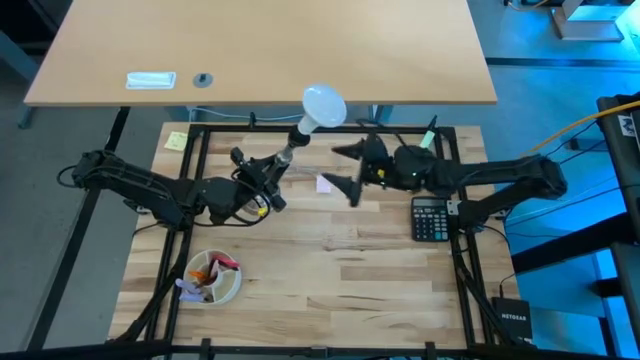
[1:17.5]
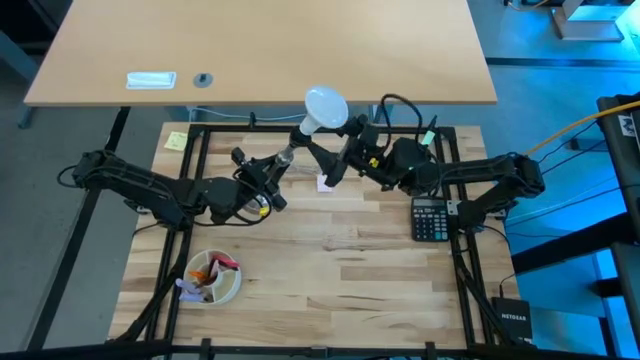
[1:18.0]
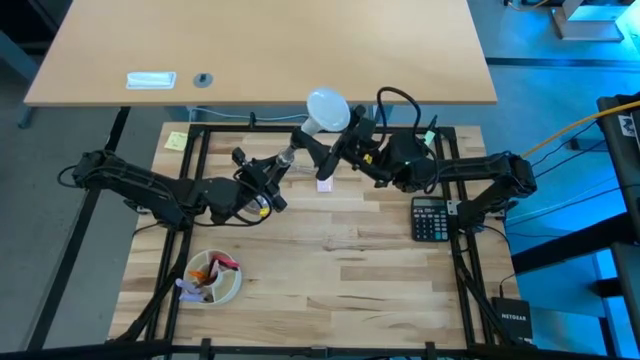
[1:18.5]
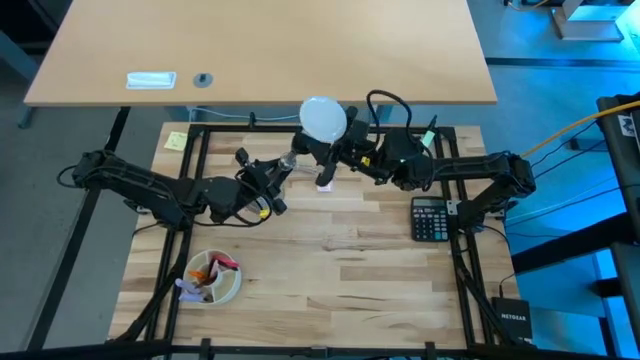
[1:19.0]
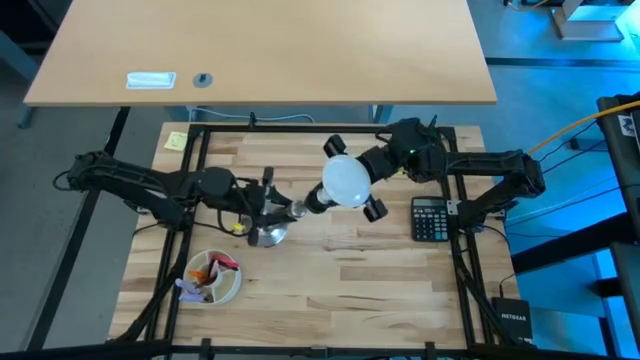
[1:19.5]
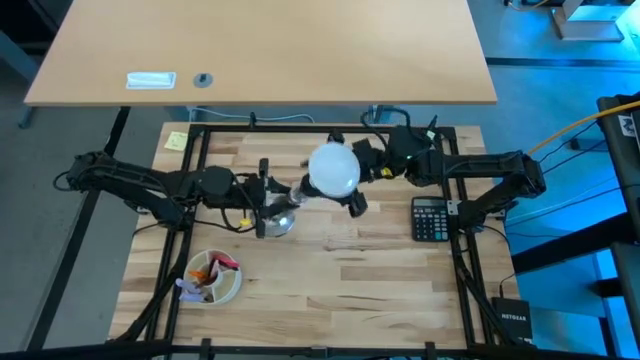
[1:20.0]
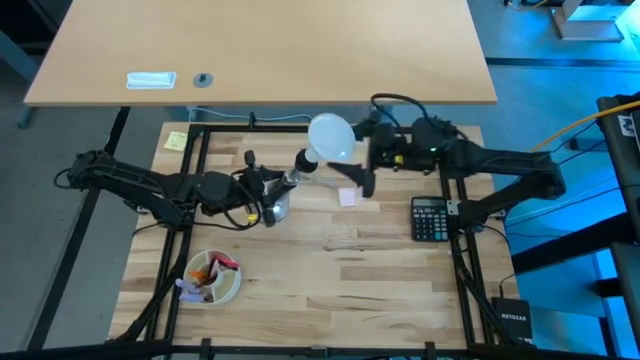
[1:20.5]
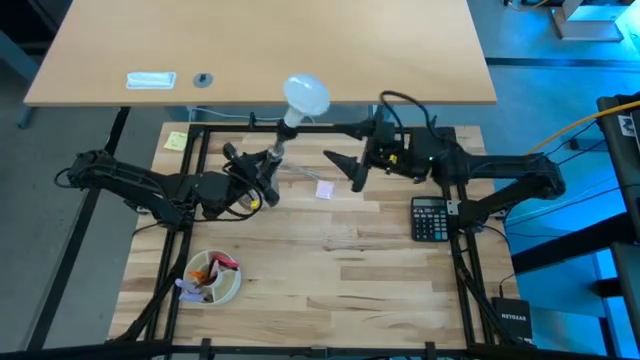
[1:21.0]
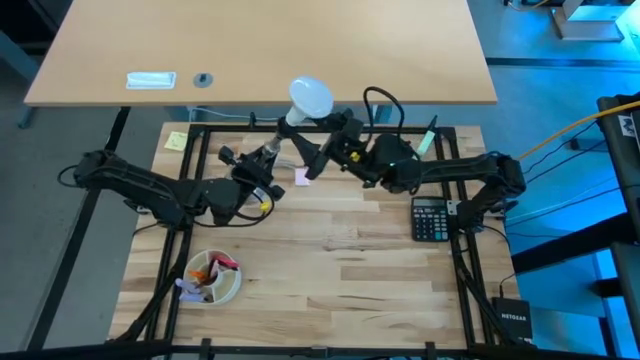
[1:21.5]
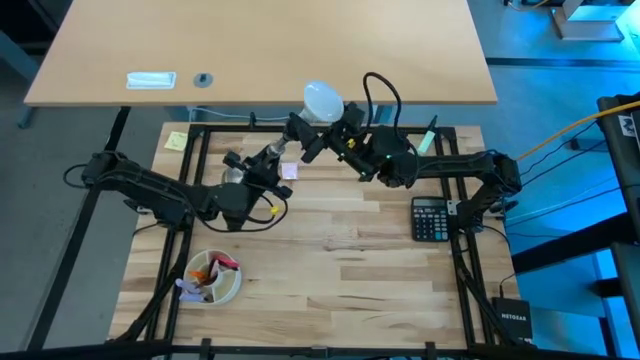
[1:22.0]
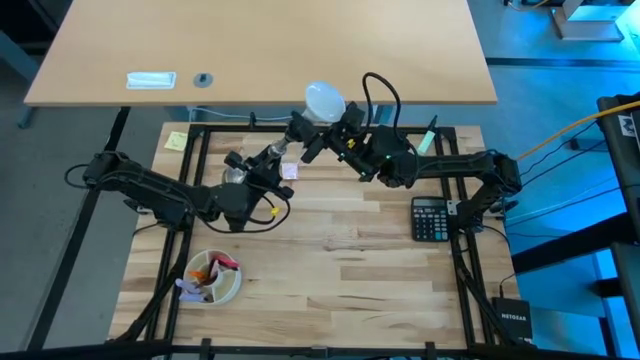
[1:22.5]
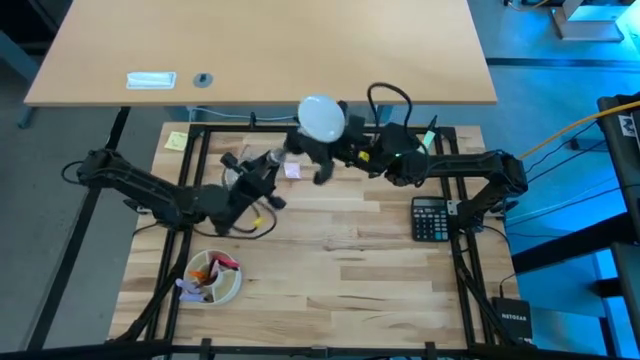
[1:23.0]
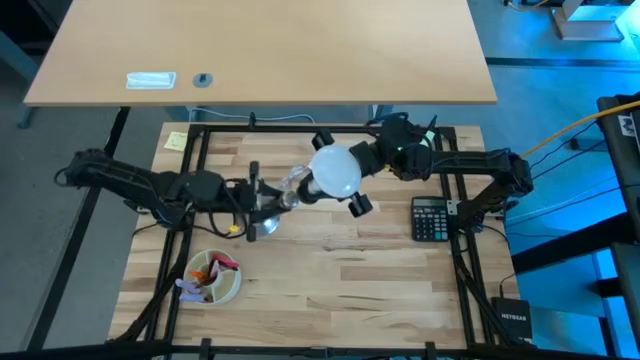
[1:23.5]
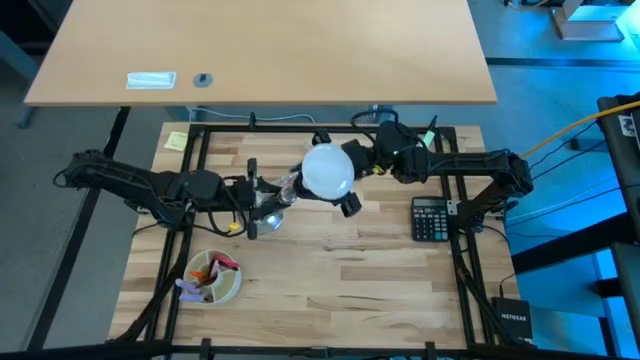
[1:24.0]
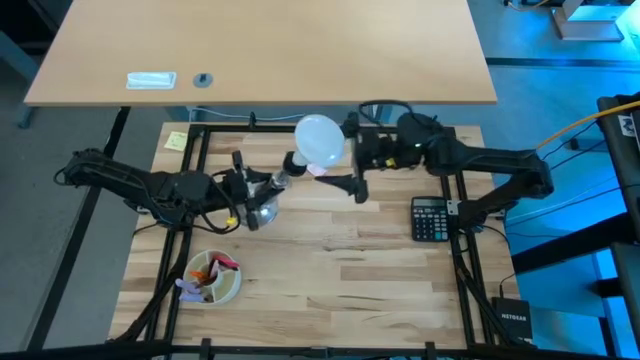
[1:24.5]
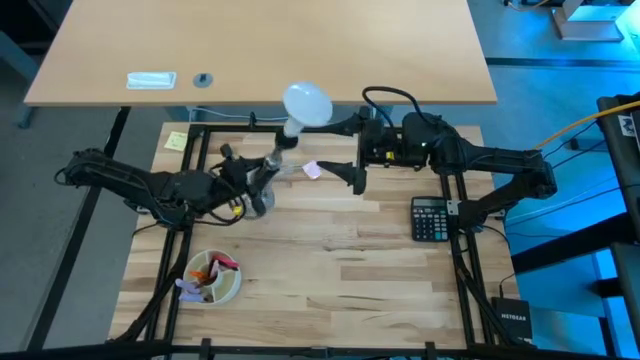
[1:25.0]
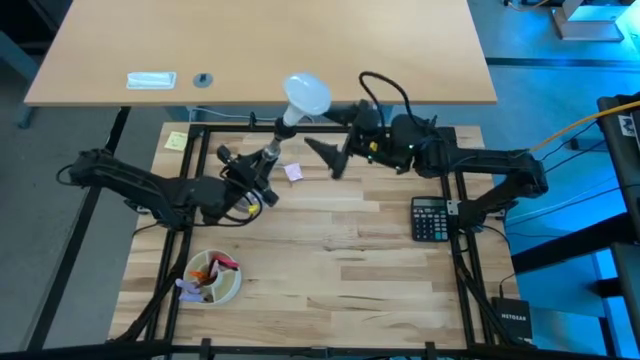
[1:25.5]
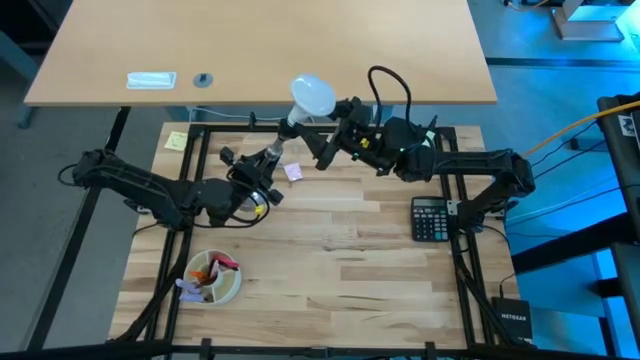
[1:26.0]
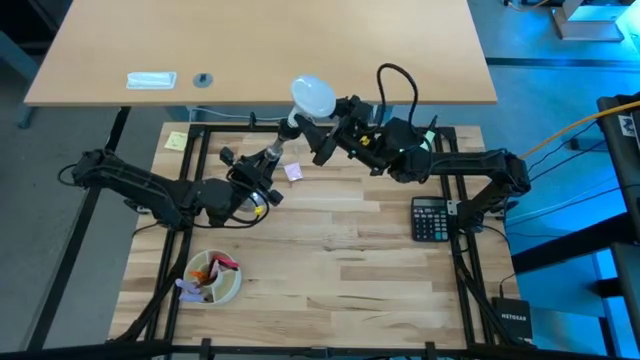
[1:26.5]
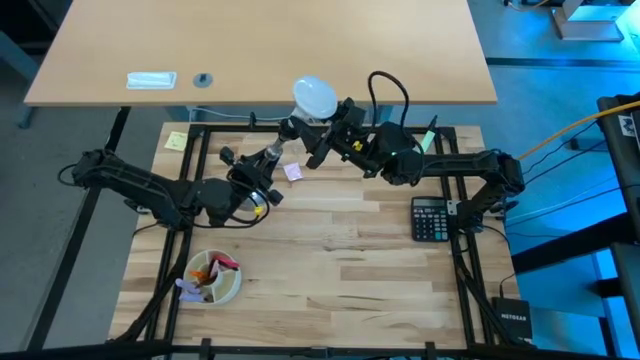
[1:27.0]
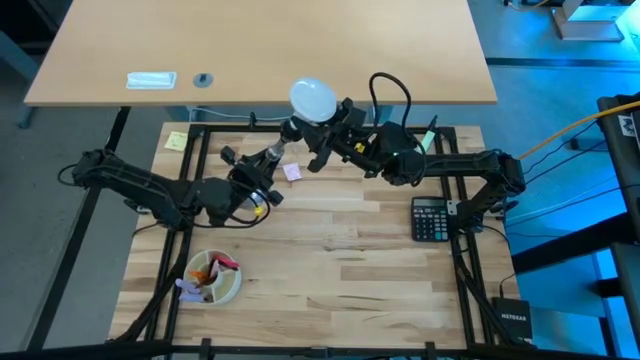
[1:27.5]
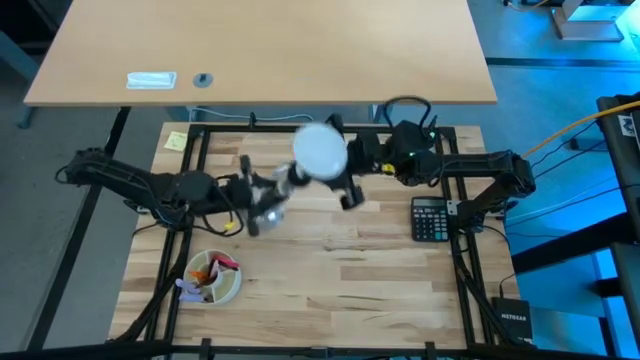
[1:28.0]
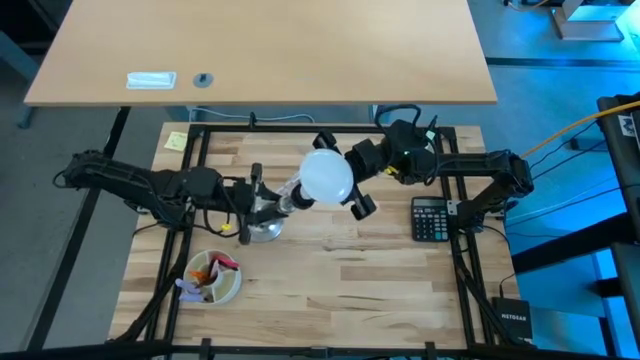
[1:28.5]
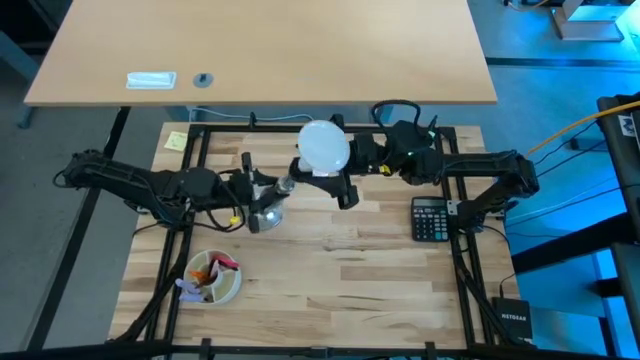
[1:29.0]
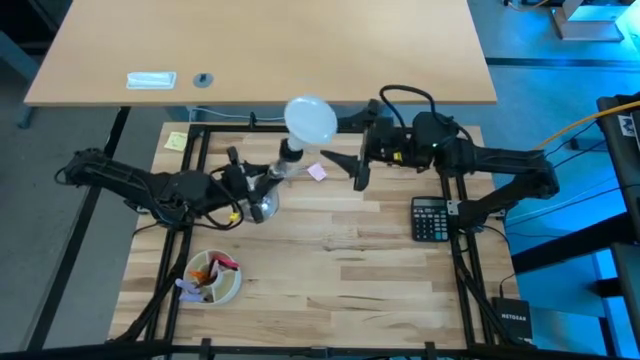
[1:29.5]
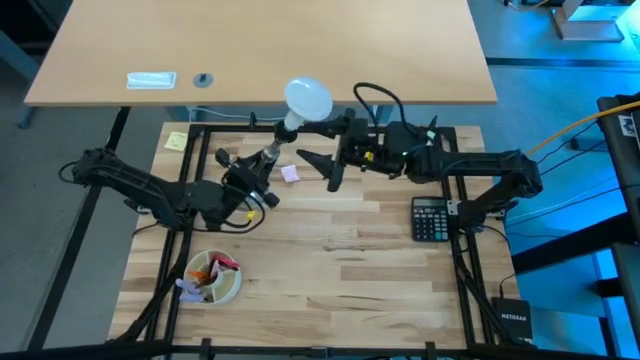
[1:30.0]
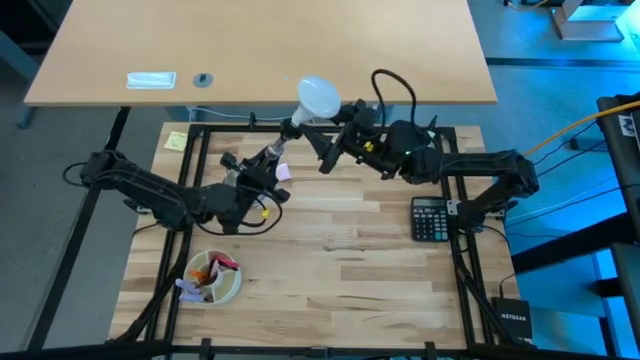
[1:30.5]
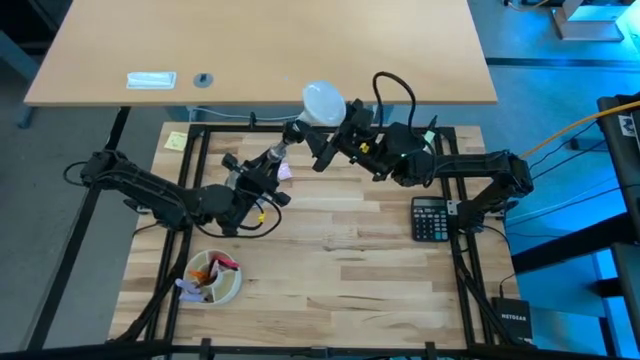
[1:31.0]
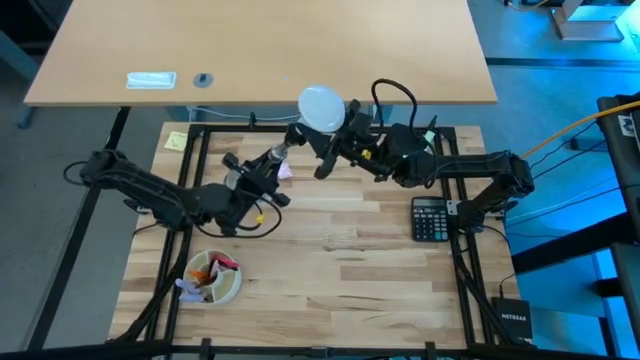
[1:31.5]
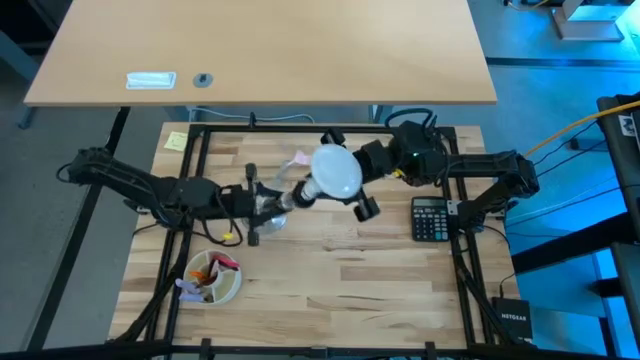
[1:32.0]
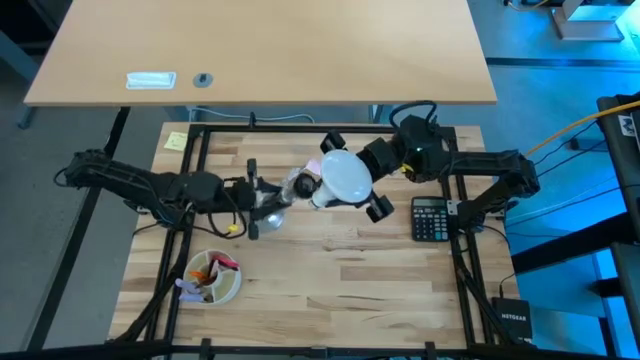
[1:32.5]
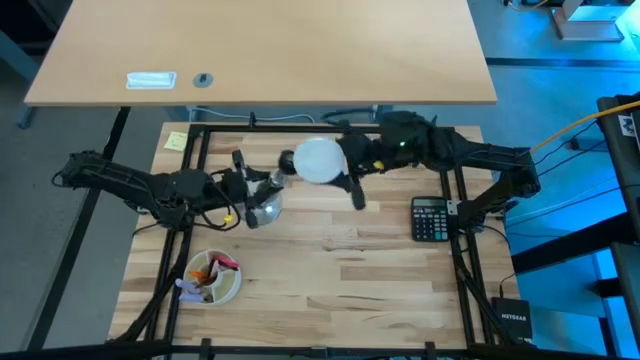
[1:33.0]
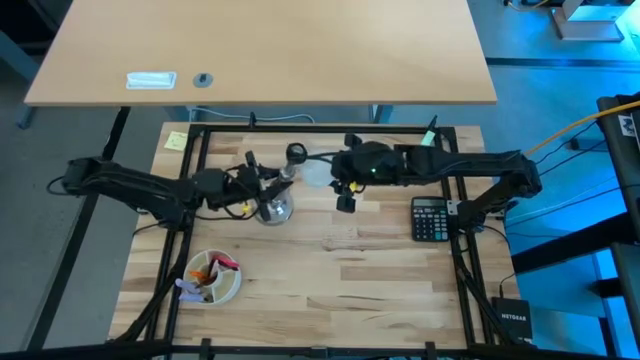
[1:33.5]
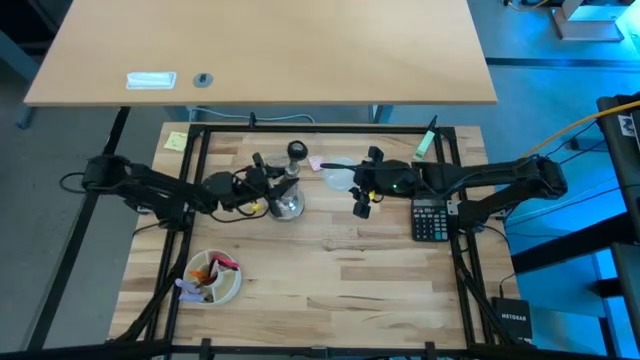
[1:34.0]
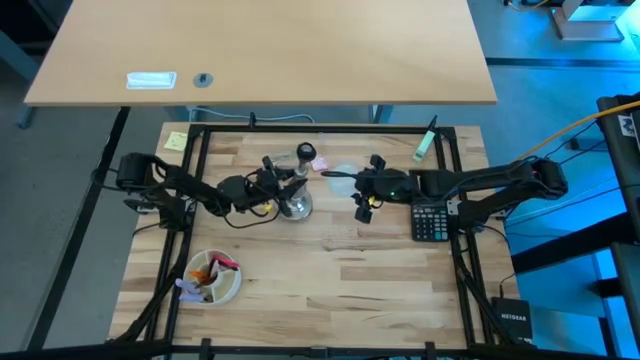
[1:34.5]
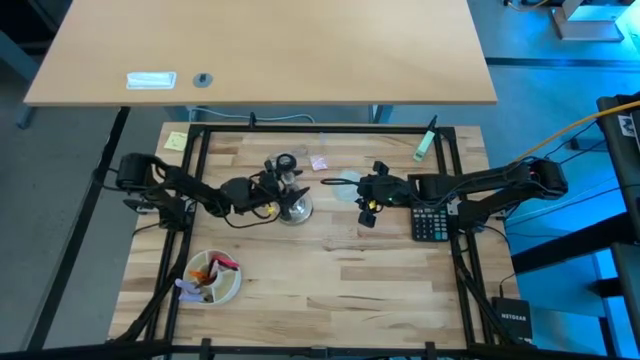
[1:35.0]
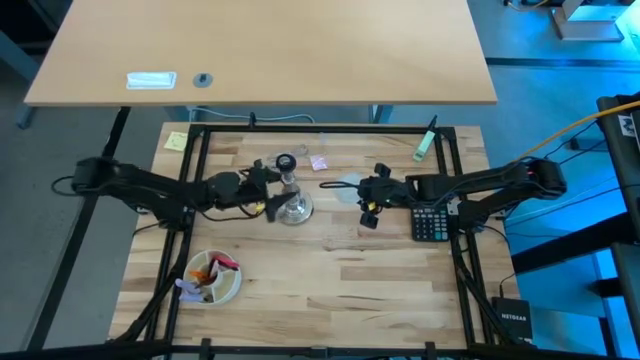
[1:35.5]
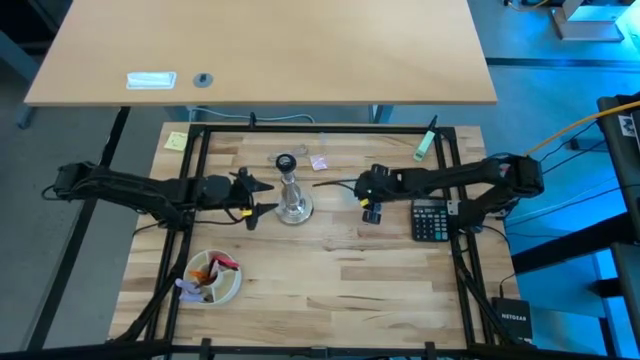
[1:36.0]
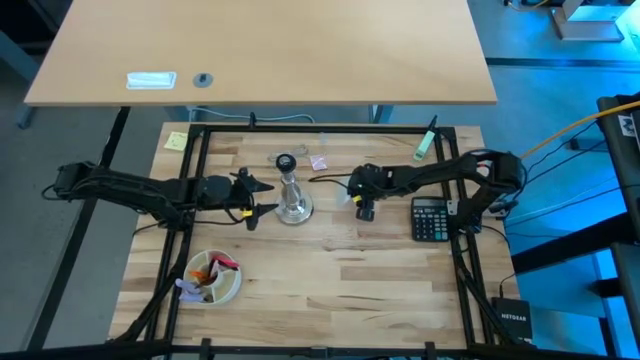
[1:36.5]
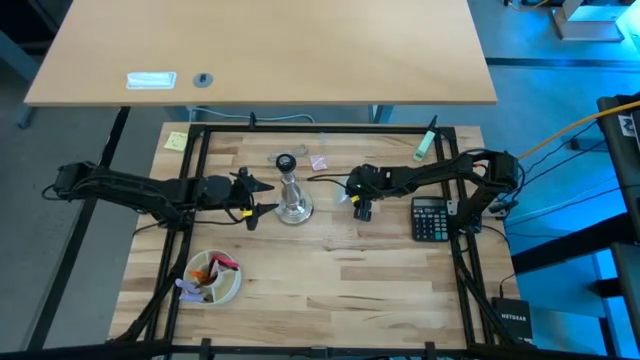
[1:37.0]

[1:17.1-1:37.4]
Task: Screw lightbulb
Remove the lightbulb from the silver lamp

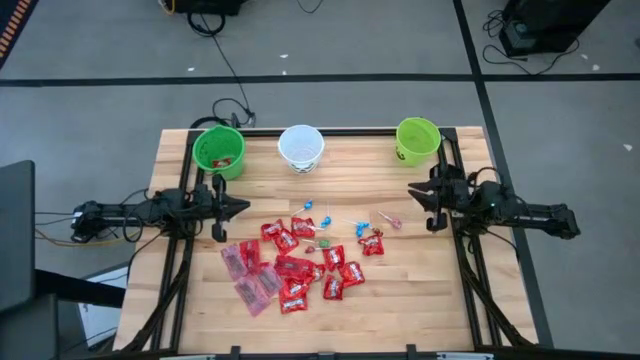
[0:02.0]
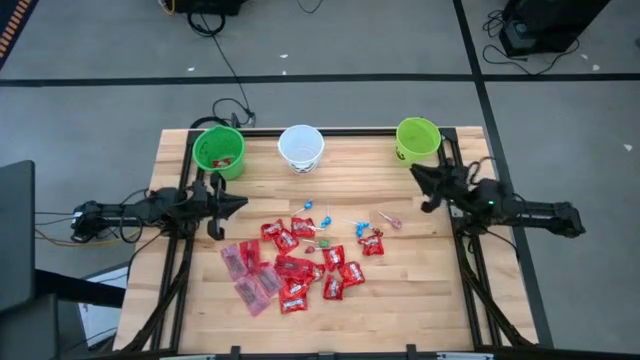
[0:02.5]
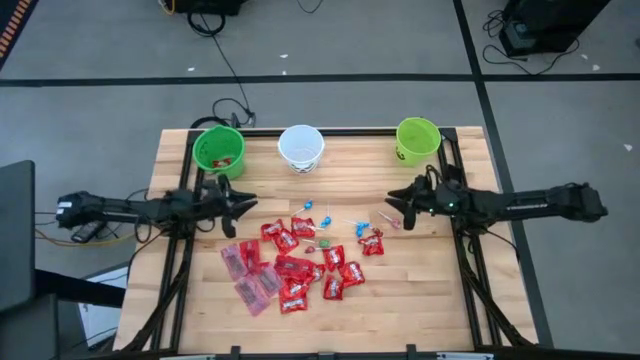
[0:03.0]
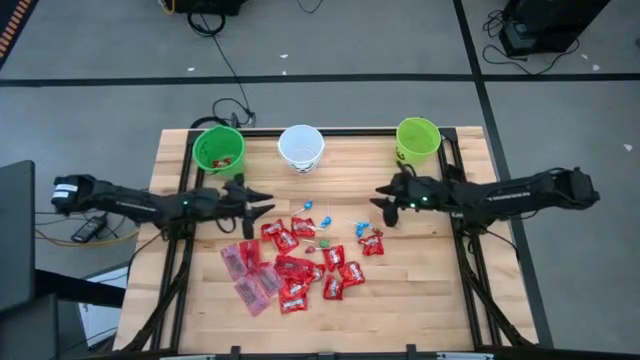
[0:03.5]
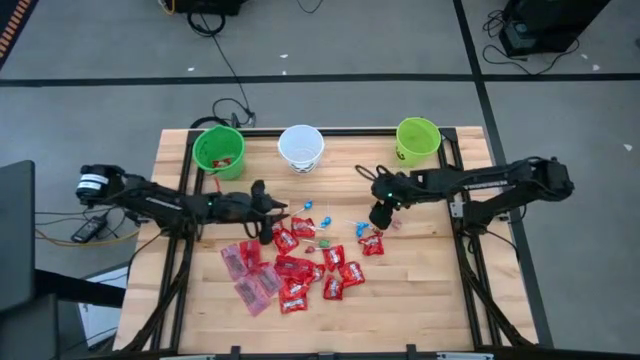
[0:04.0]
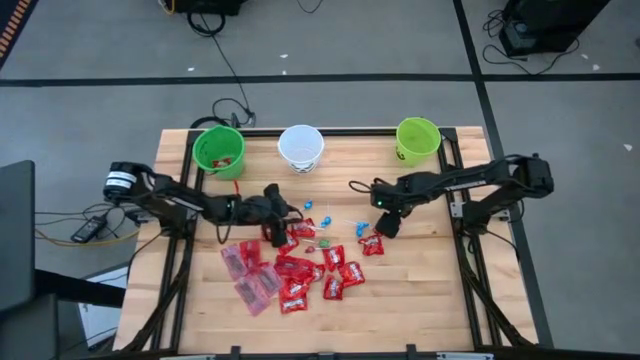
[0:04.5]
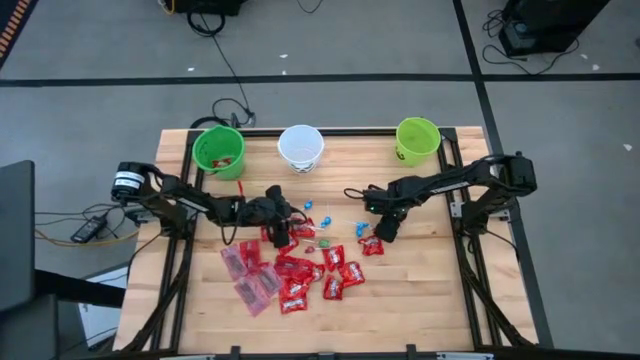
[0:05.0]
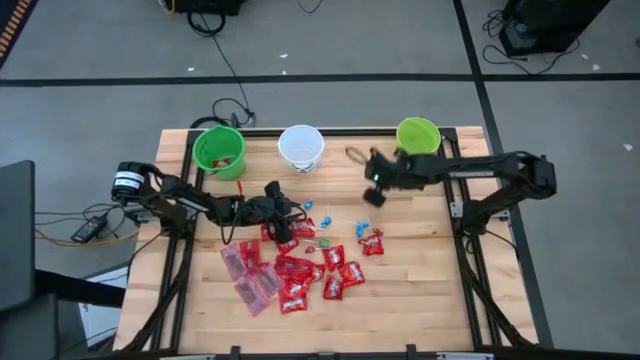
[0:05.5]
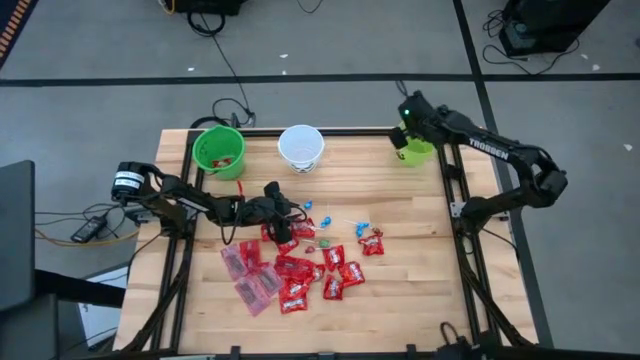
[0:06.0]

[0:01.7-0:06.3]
Task: Sort candy by brand, put in halloween buckets
Put the red lollipop into the light green bucket
